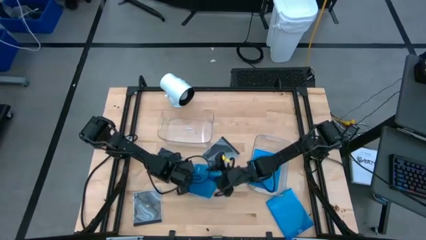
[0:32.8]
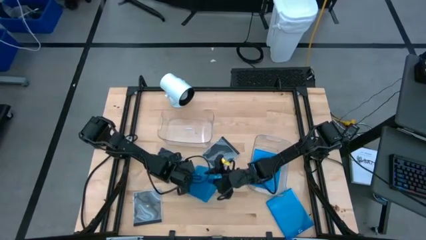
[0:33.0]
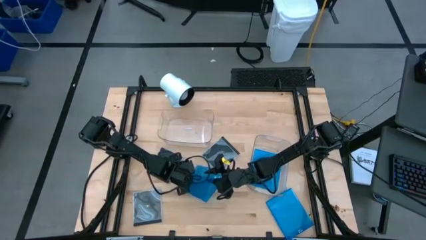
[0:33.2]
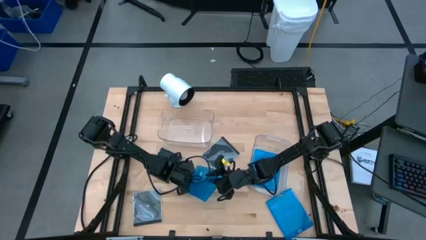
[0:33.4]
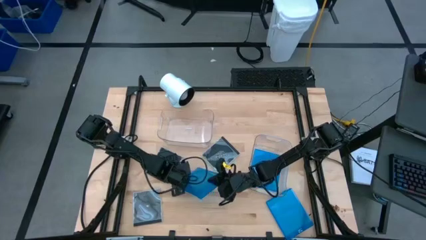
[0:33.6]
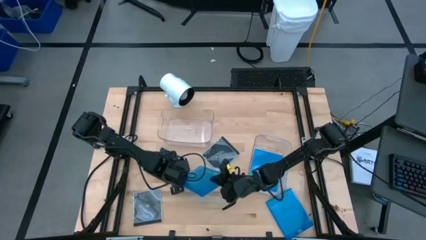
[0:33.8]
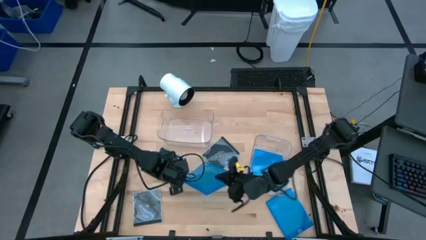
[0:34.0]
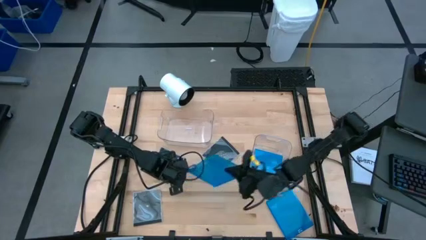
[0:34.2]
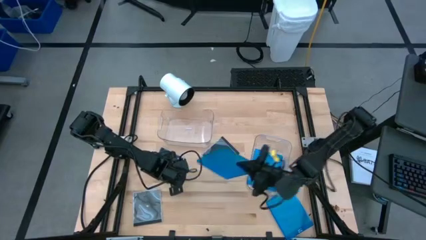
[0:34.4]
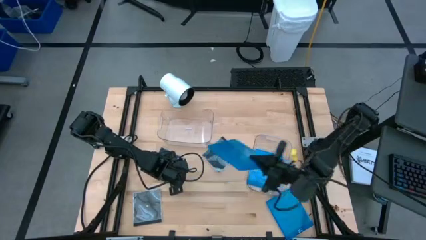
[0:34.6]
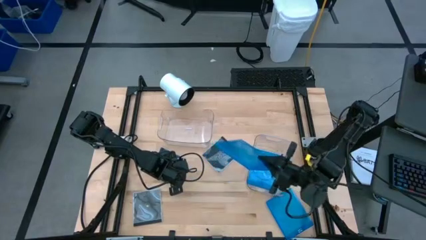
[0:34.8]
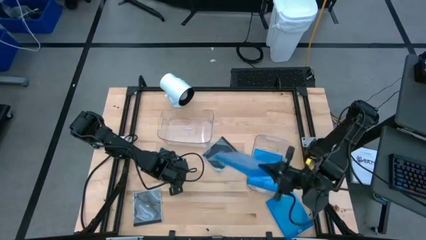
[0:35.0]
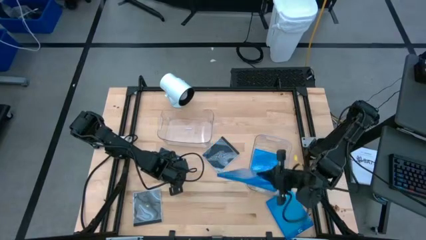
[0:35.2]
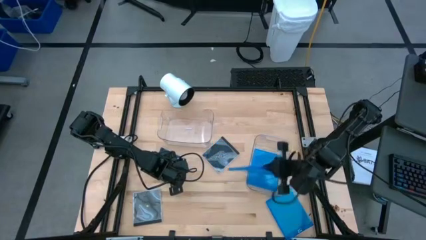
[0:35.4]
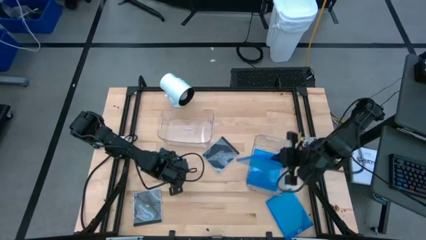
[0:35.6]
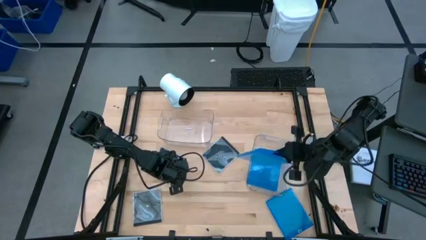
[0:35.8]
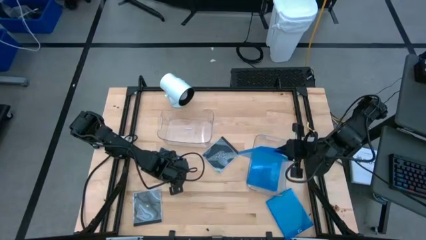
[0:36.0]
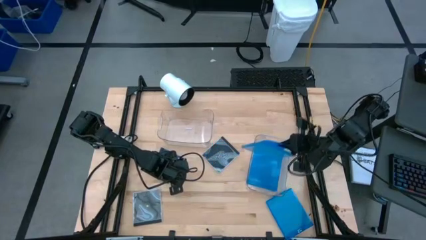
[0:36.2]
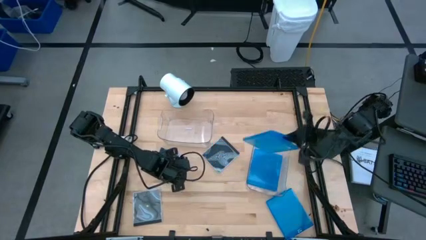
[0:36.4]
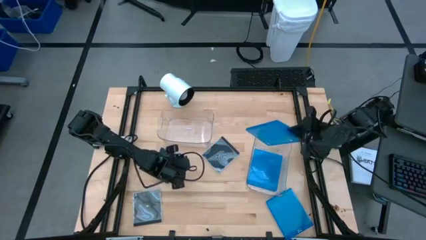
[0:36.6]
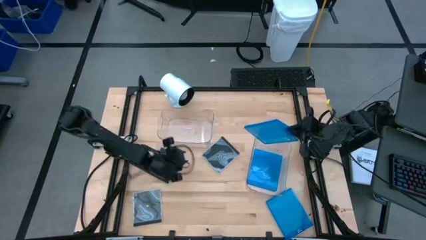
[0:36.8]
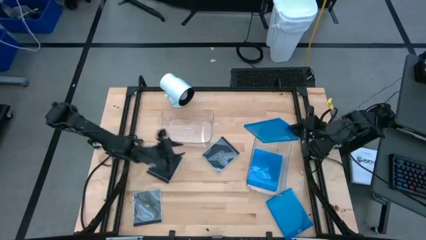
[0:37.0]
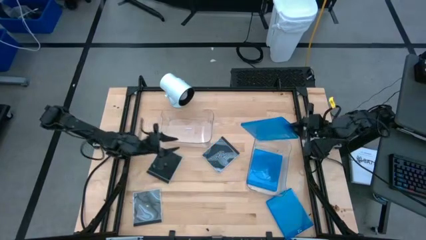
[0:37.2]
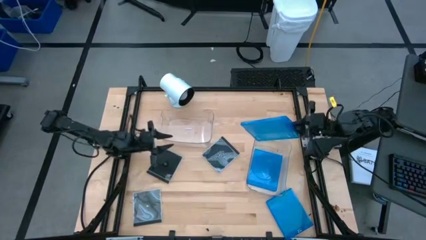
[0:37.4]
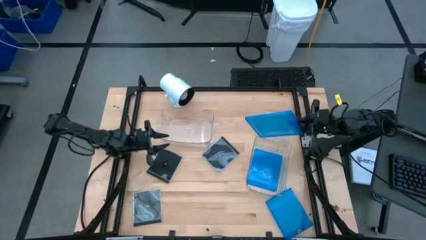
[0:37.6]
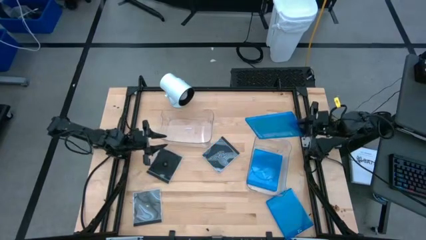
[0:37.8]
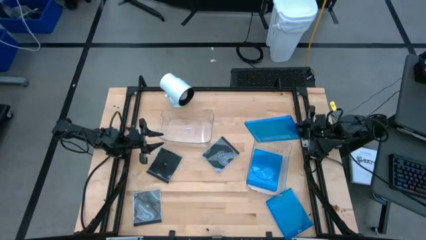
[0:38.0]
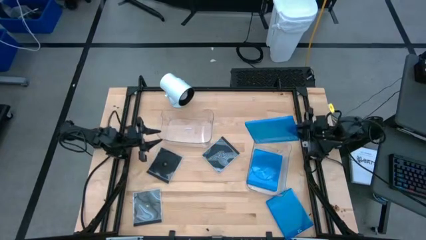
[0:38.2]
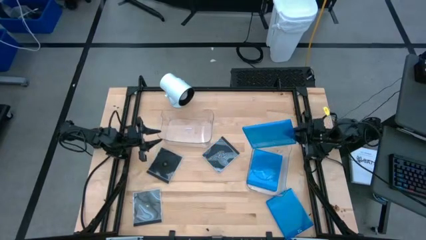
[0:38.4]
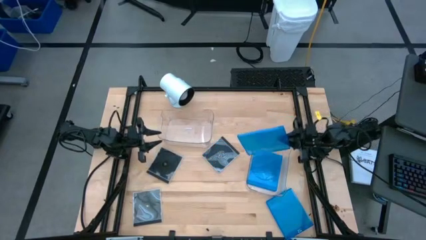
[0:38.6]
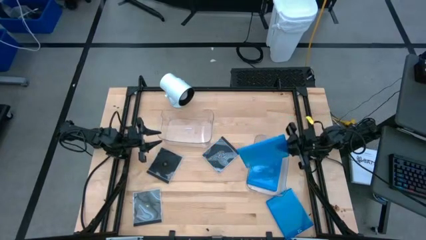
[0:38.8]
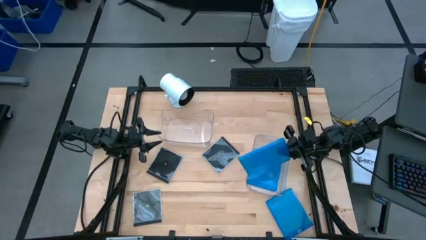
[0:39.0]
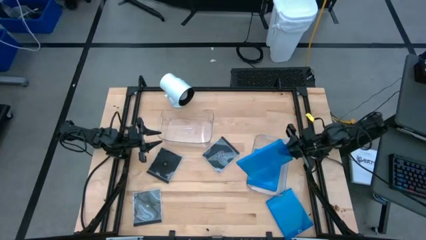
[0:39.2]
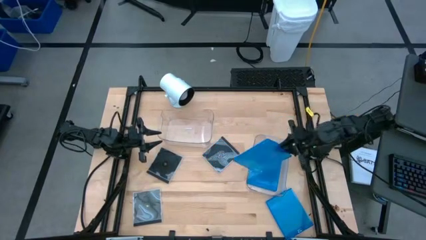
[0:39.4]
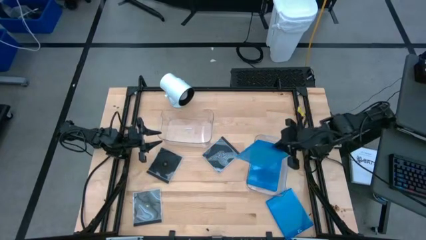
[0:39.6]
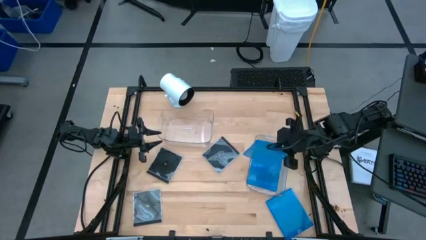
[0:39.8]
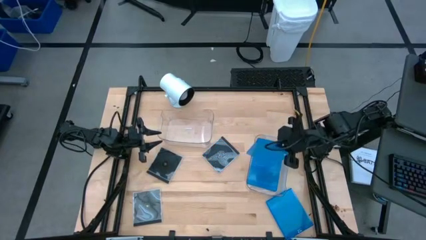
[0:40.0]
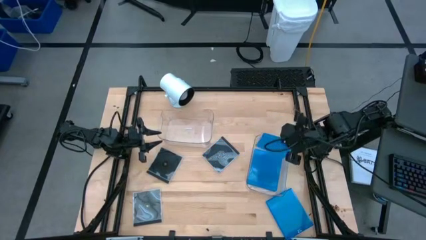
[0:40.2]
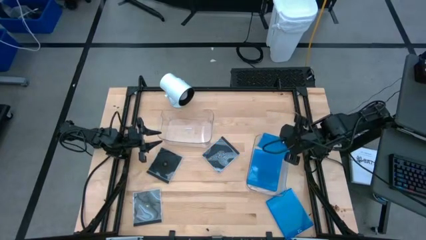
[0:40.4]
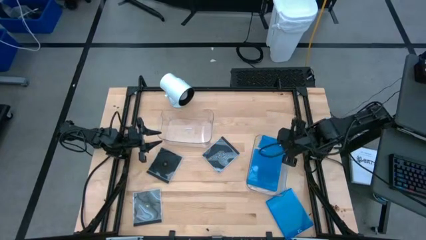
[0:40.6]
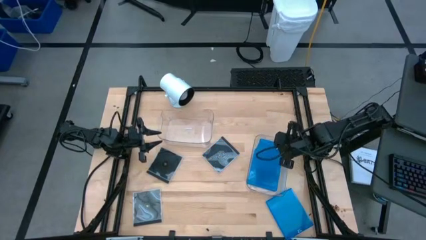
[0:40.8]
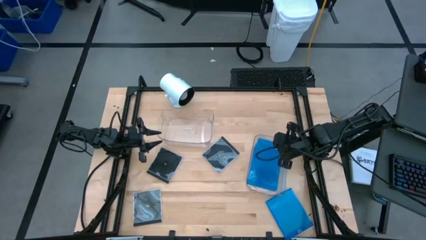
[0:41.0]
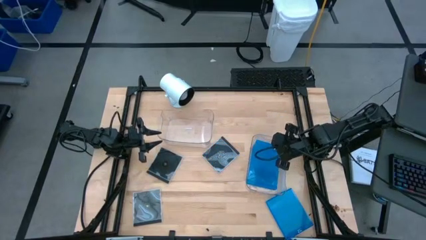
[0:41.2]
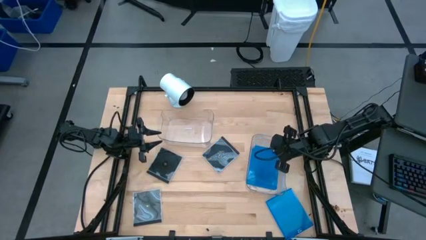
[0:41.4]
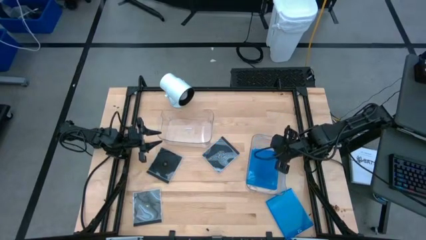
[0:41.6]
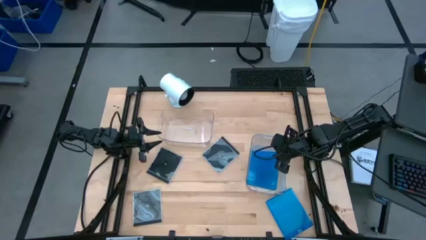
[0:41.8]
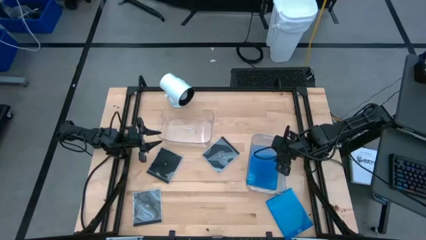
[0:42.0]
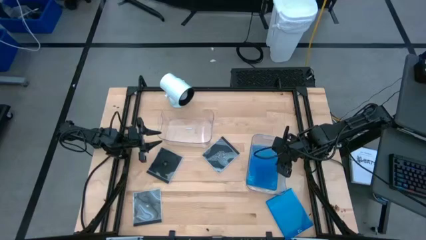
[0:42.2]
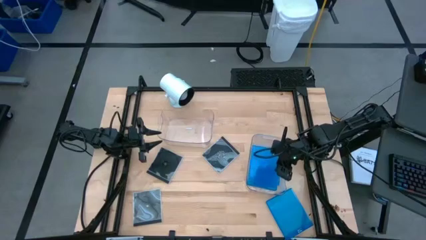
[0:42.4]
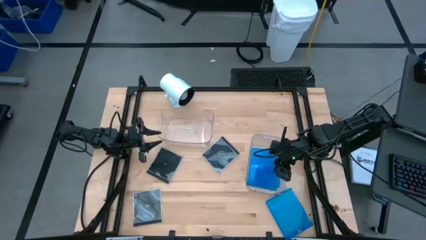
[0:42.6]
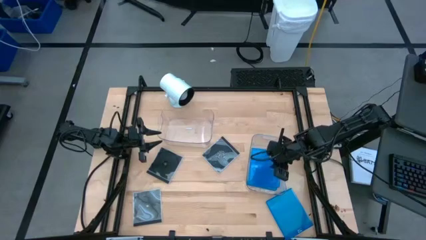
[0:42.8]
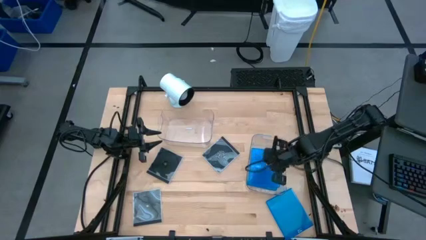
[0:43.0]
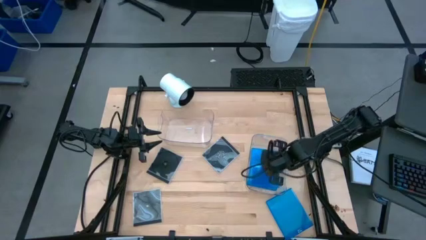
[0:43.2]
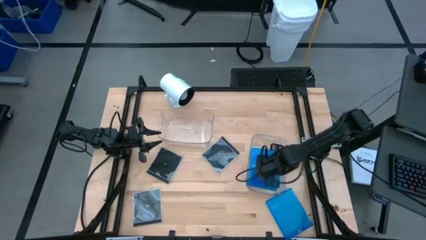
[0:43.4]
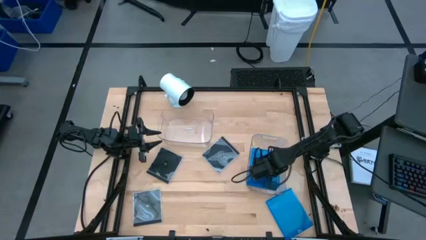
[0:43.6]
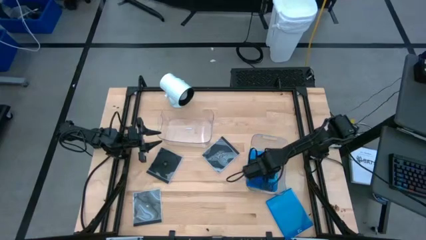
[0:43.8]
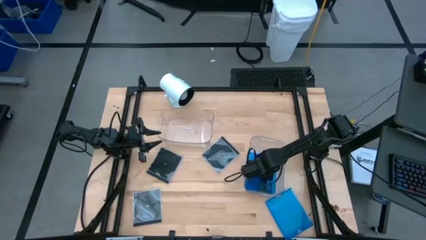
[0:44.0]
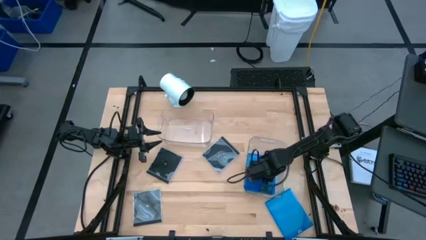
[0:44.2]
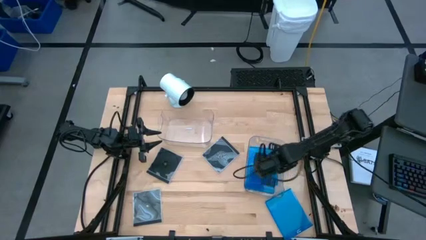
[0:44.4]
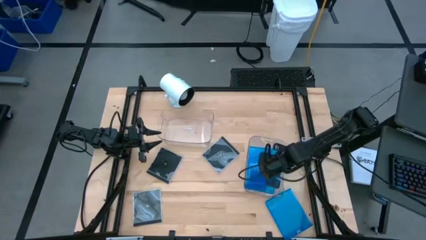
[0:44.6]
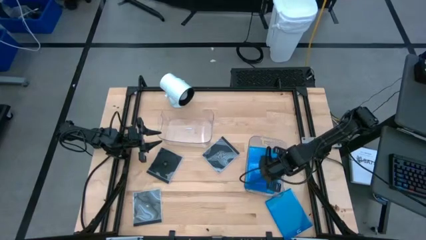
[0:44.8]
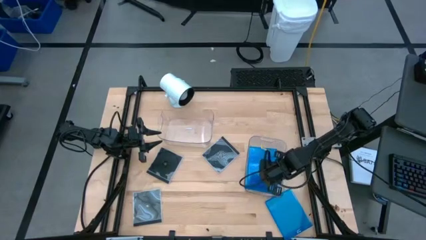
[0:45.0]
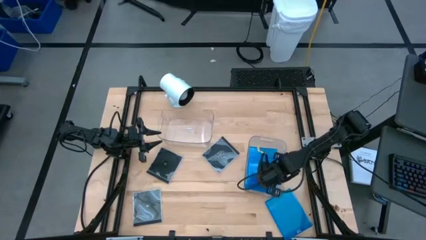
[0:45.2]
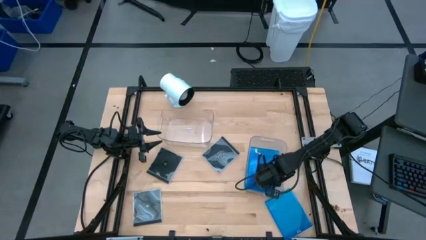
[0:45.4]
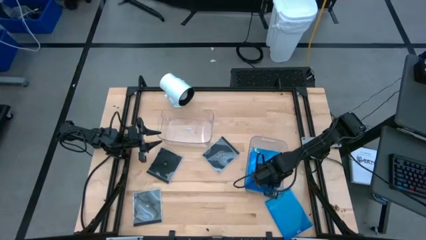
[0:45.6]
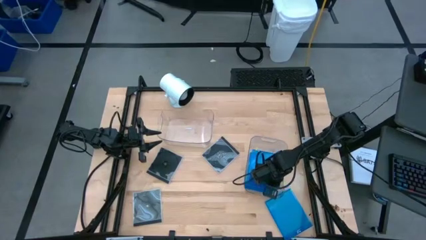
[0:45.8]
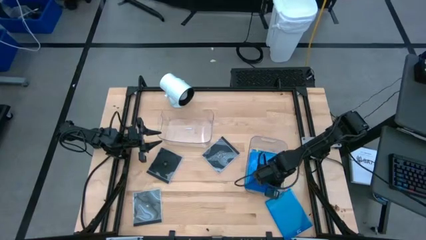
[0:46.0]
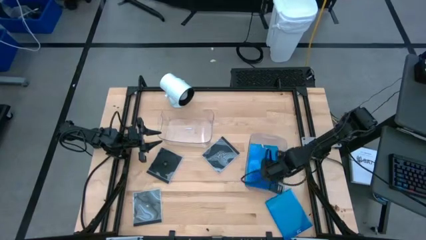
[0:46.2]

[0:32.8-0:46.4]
Task: Pick & place jewel cases by type
Put the left blue cd case into the right transparent bin

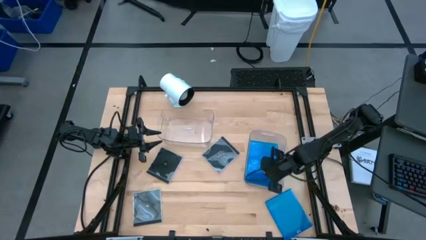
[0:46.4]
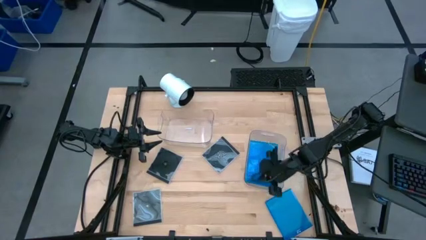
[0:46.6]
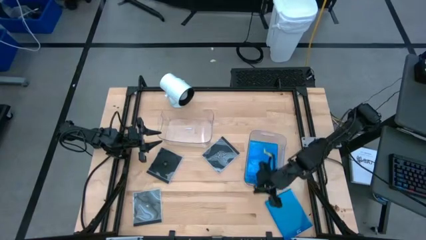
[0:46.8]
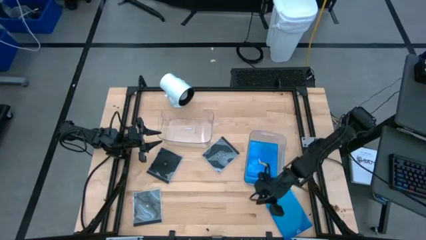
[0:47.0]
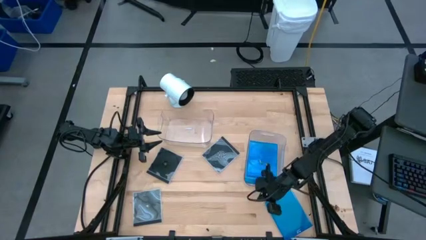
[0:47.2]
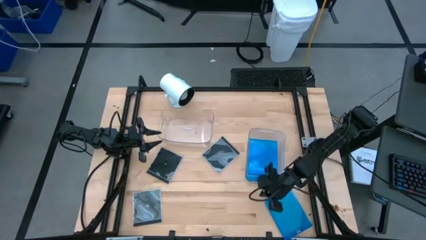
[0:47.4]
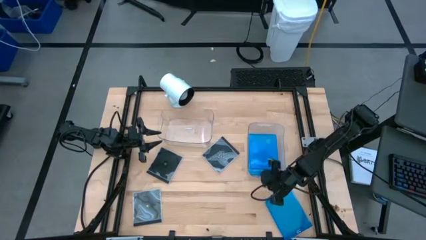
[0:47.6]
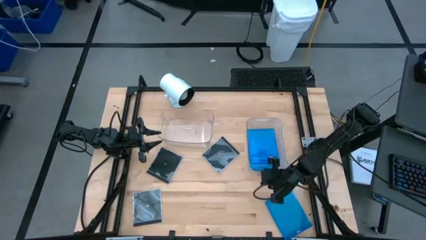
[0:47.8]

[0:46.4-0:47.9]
Adjust the right transparent bin
